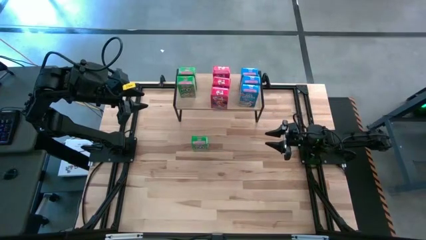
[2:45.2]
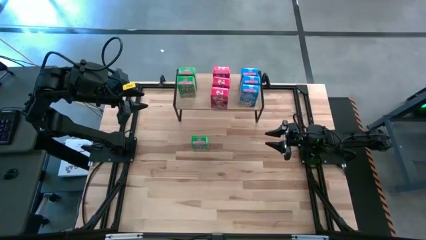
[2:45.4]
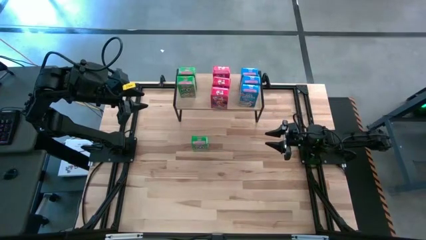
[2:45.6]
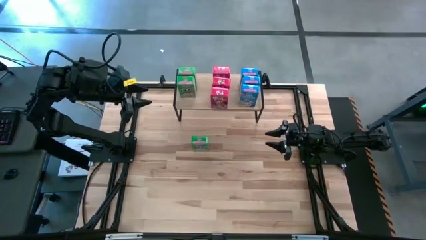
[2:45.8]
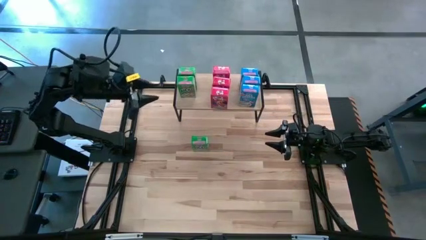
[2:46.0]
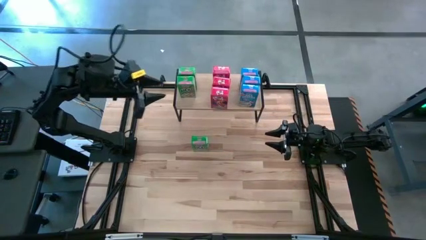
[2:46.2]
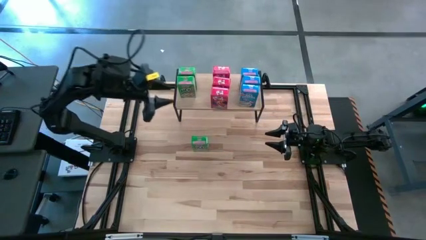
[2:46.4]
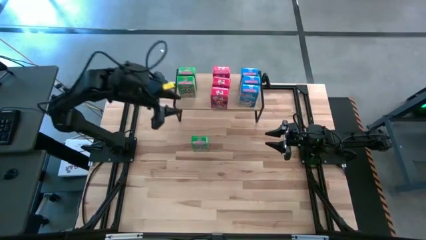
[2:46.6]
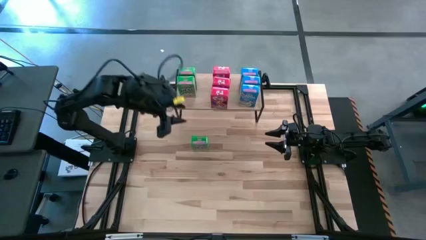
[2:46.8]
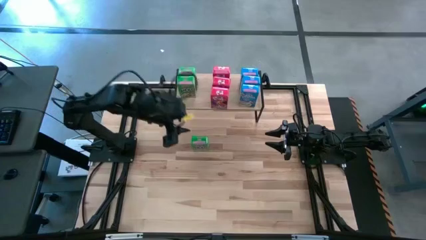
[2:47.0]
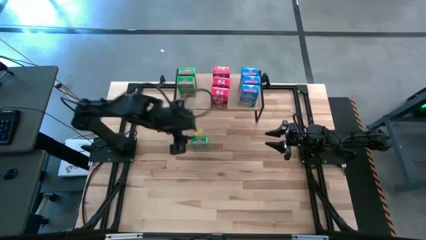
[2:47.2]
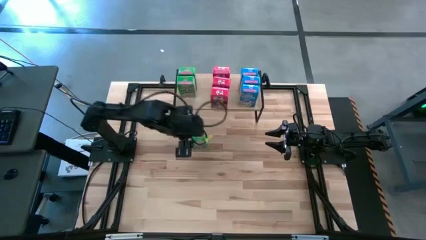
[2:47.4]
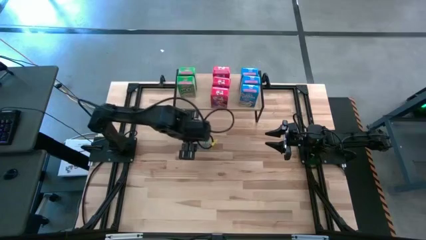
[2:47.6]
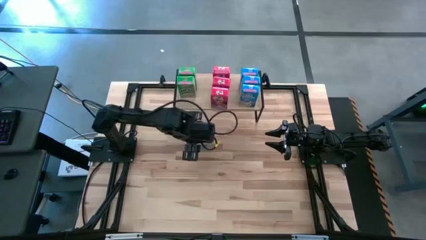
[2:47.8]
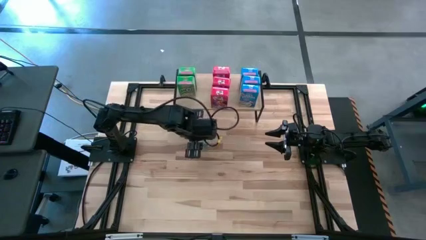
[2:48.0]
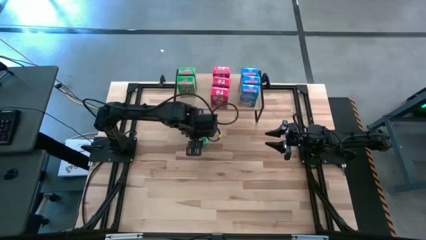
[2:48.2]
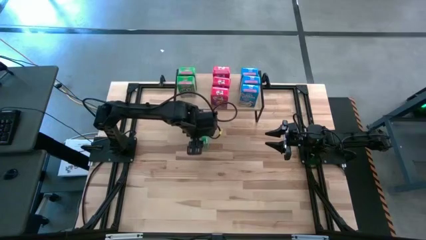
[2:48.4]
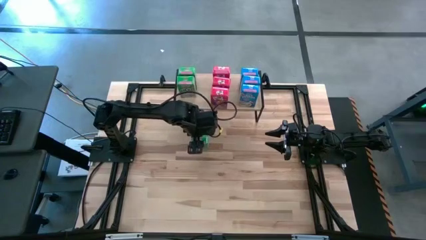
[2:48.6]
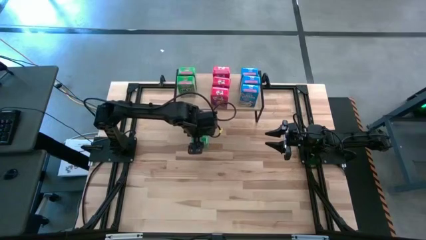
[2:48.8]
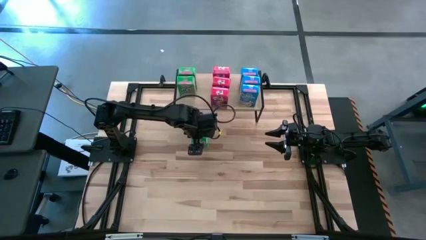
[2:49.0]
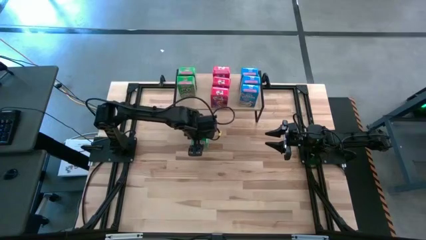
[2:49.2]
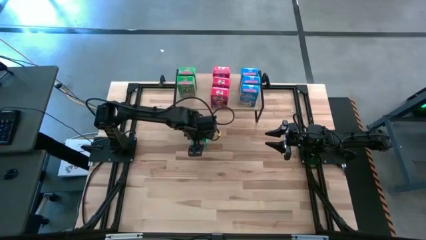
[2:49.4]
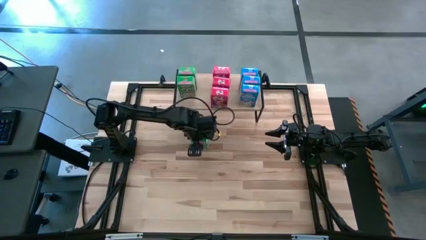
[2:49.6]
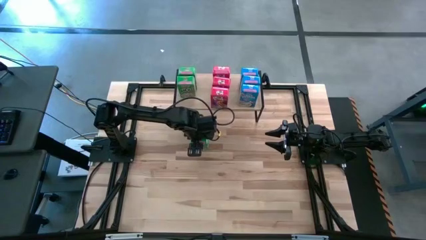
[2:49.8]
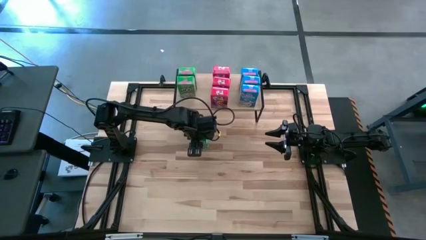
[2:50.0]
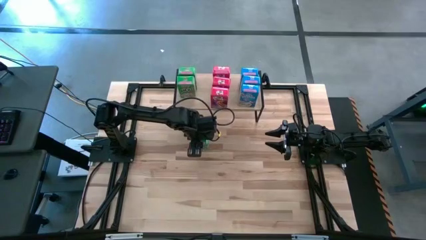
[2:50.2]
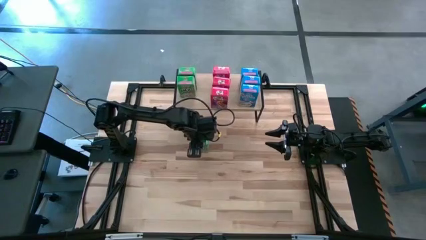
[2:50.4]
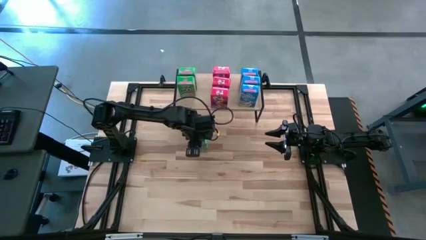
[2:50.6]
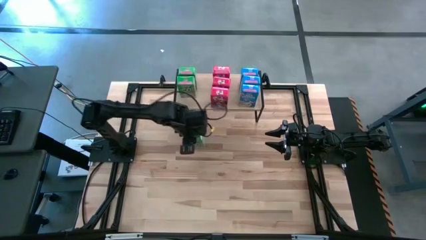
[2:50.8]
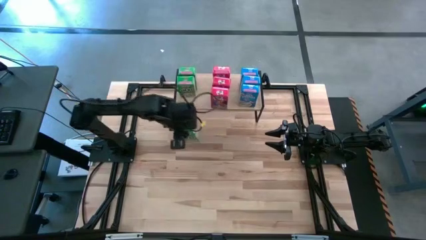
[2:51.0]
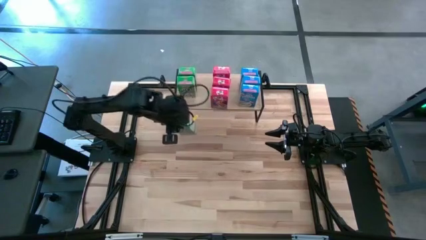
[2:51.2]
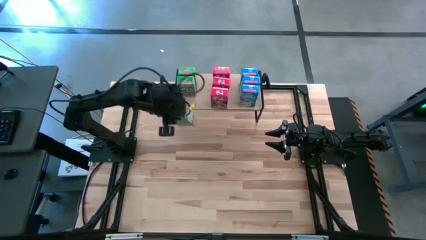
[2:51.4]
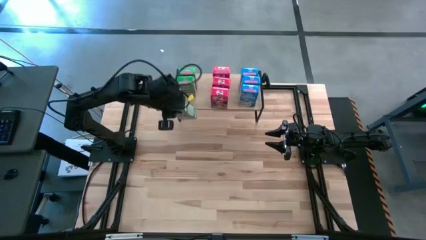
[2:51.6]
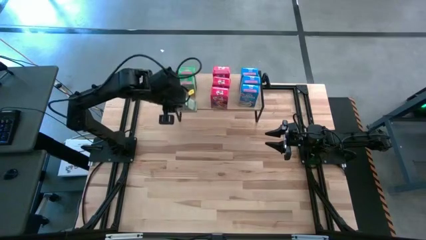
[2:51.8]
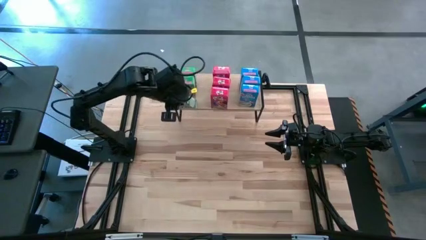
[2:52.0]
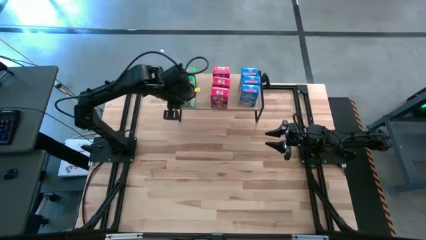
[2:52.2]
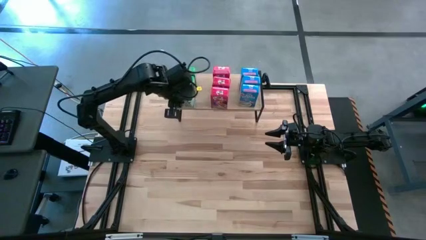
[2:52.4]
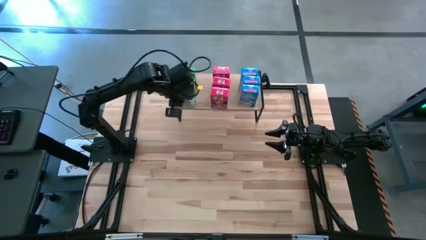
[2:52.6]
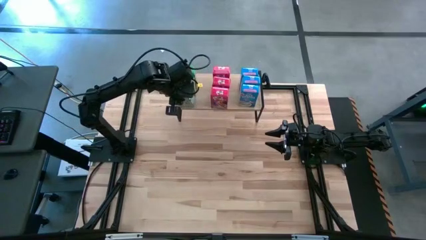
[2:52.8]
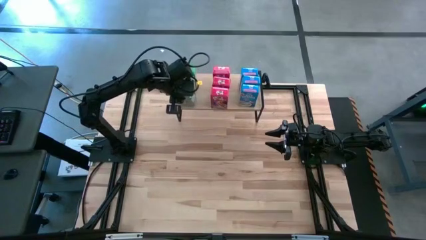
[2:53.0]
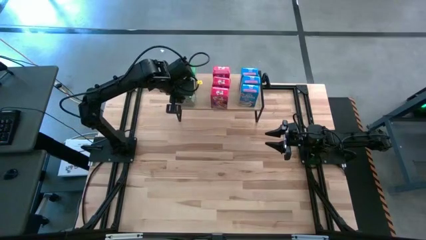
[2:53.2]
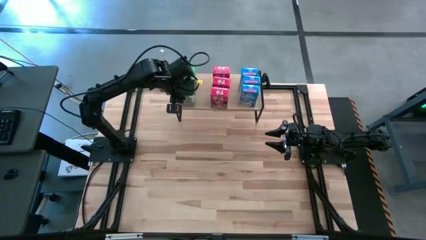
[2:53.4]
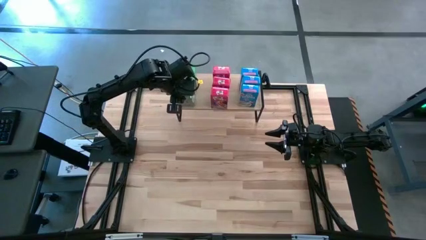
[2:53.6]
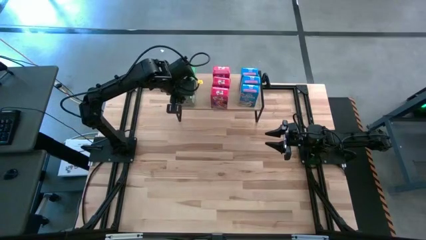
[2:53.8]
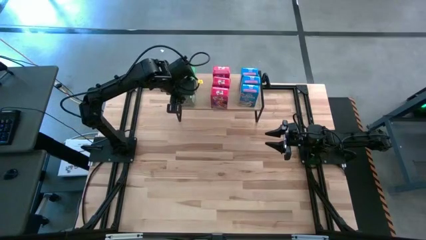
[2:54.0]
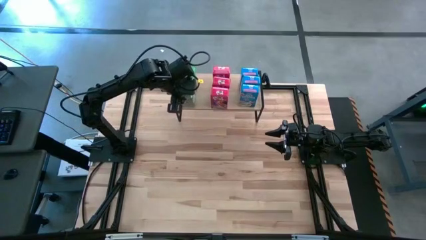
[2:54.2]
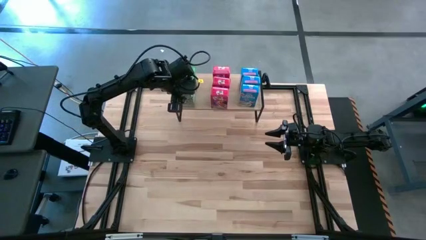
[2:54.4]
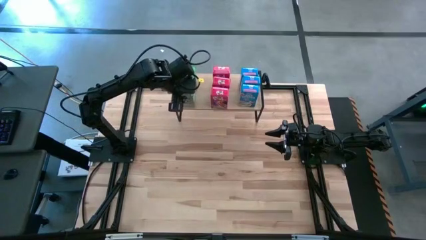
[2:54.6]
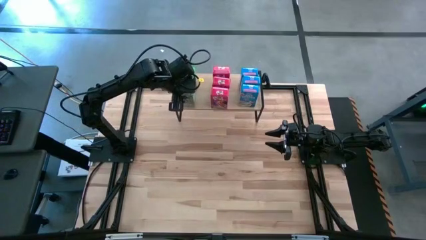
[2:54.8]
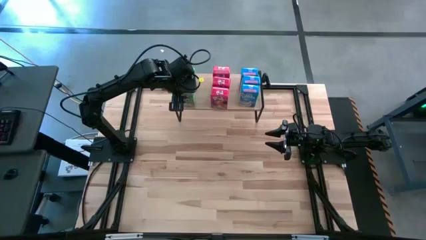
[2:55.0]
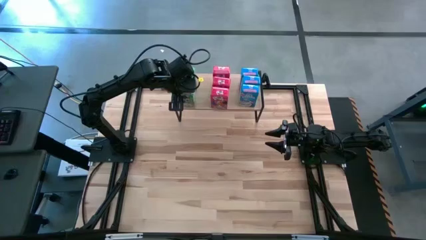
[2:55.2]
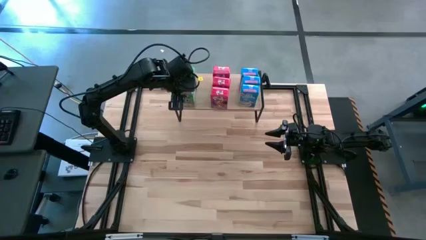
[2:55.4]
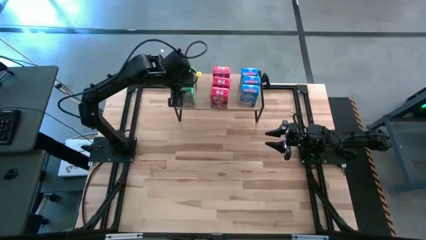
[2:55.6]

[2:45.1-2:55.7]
Task: Stack cereal on shelf
Put the green cereal box on the shelf aligned with the other green cereal boxes

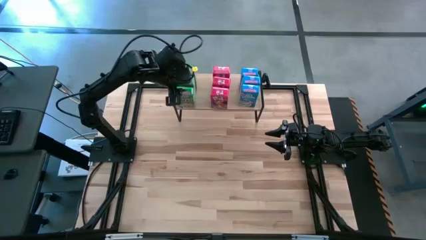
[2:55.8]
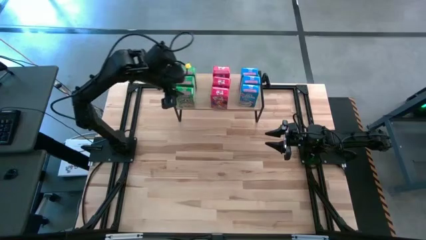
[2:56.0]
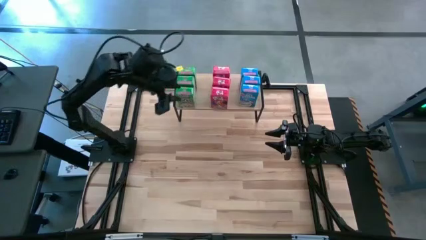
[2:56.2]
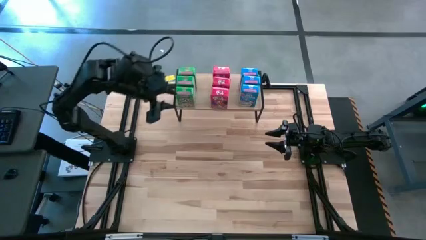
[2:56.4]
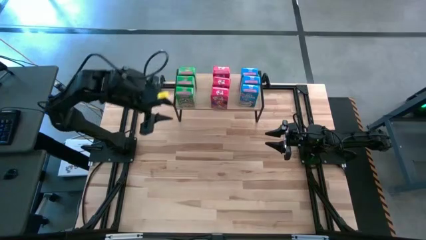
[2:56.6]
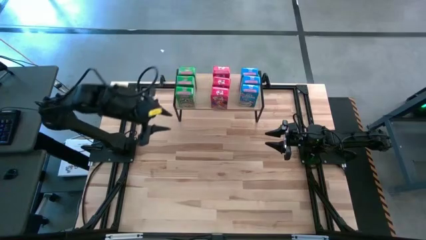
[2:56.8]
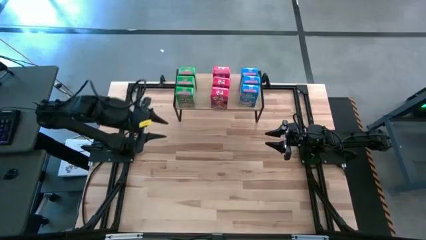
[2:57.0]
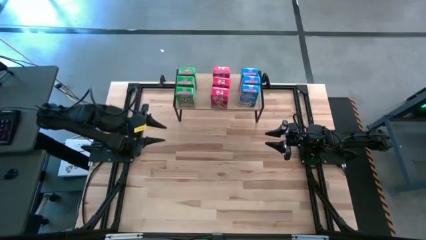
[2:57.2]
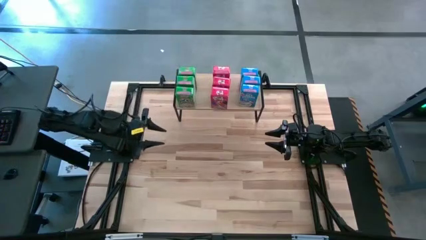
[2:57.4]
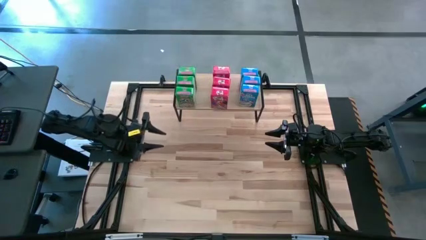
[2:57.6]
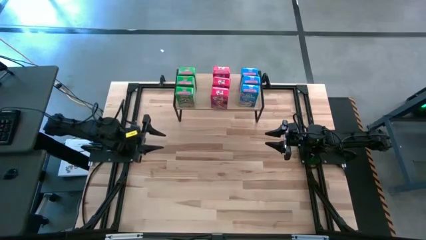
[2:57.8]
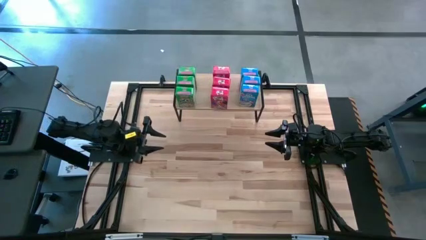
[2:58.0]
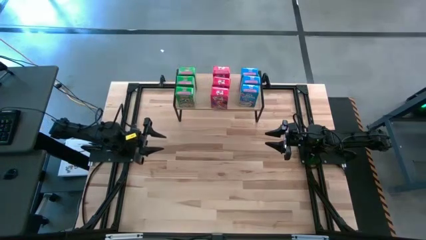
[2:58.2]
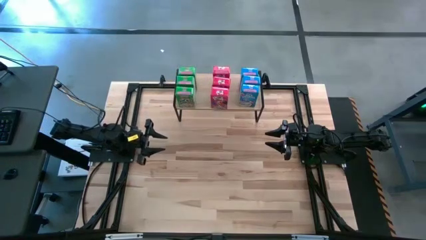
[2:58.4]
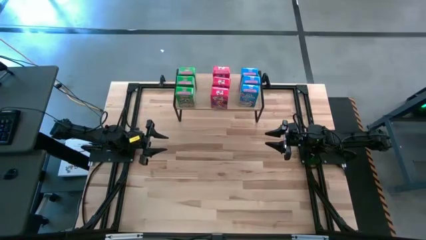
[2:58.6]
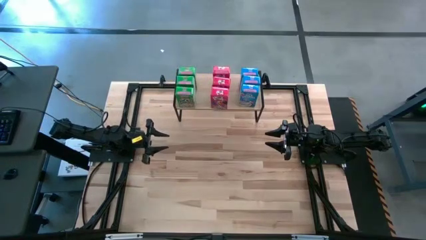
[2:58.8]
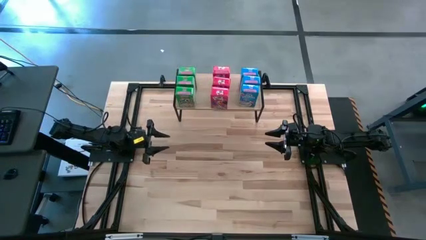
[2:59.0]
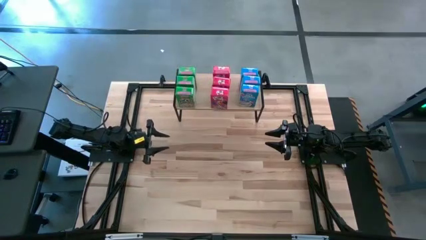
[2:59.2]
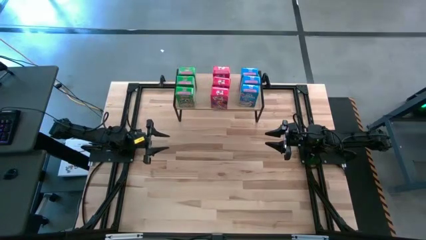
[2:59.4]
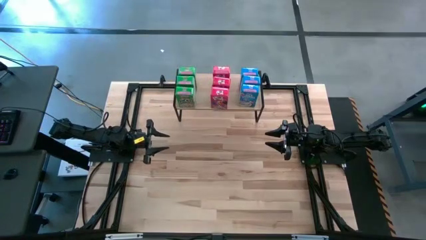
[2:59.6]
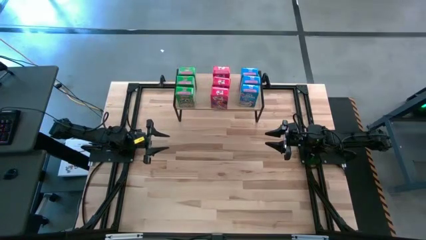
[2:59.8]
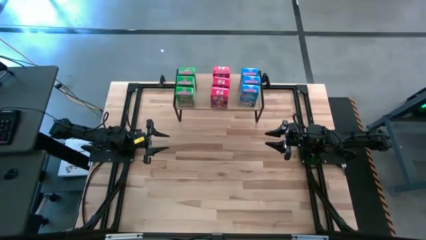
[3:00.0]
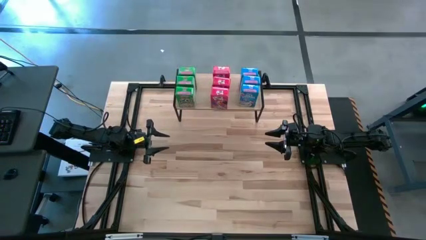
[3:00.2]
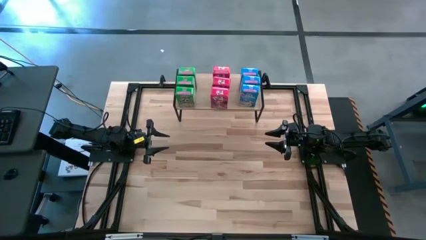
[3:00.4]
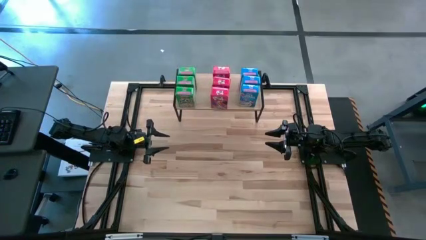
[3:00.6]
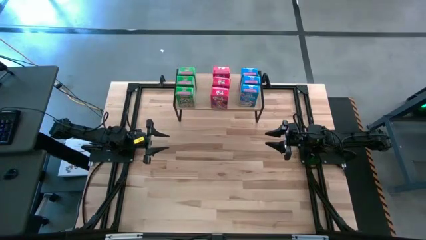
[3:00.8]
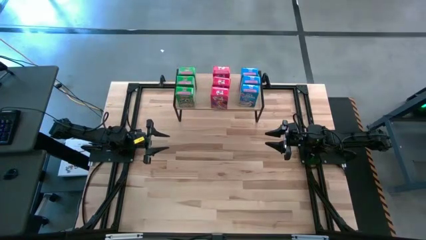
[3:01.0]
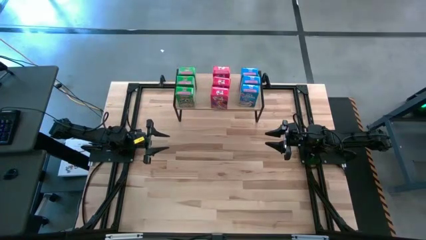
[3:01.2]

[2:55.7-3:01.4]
Return to Home Position
